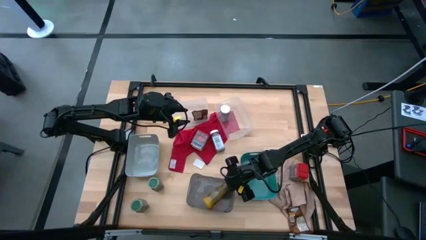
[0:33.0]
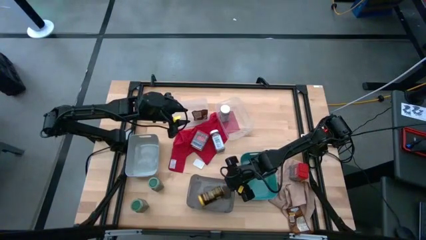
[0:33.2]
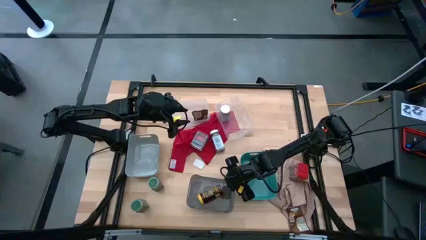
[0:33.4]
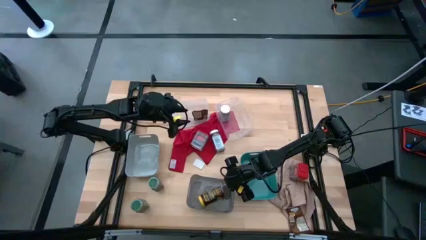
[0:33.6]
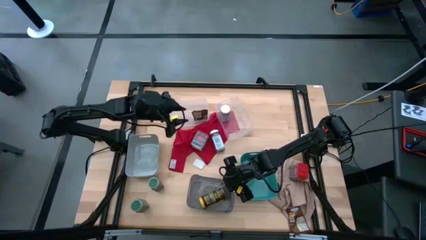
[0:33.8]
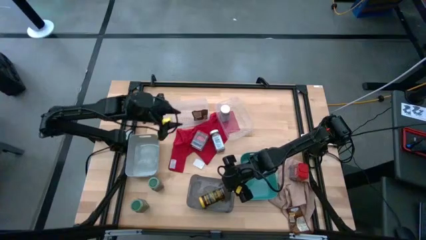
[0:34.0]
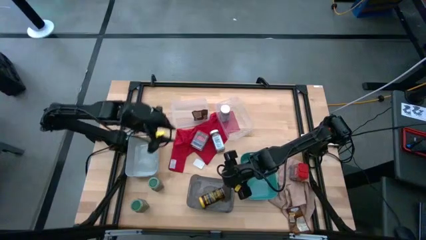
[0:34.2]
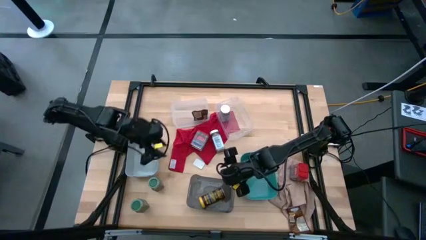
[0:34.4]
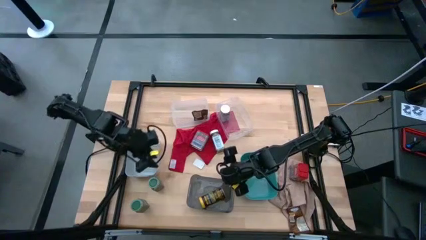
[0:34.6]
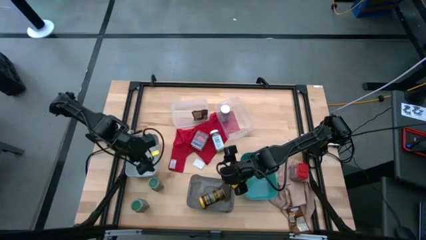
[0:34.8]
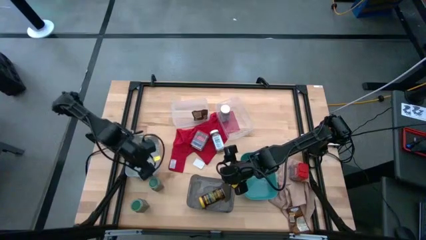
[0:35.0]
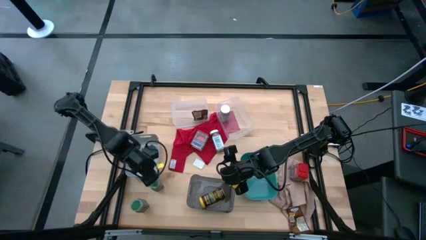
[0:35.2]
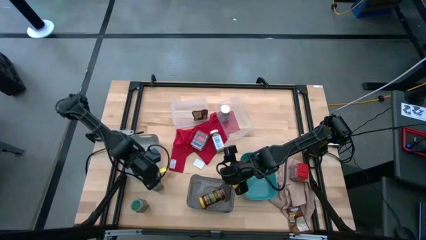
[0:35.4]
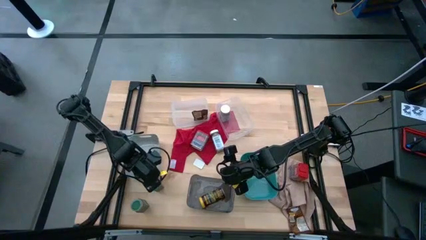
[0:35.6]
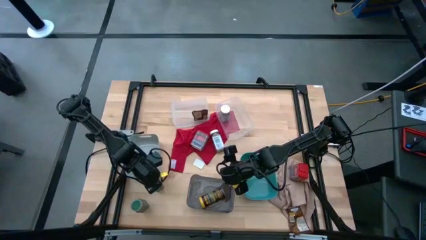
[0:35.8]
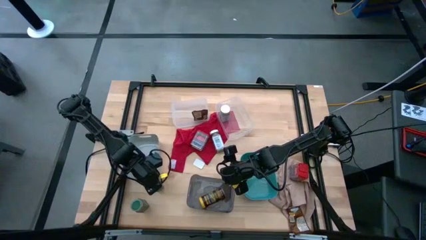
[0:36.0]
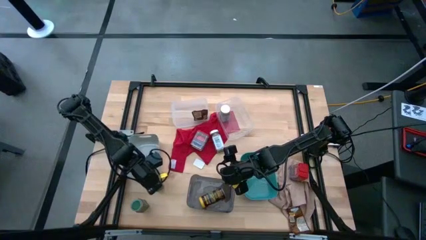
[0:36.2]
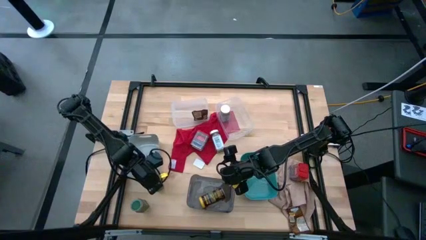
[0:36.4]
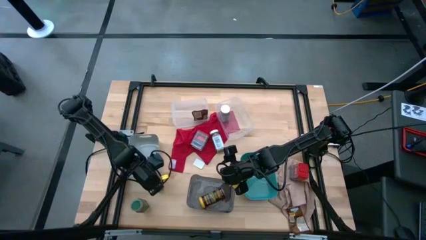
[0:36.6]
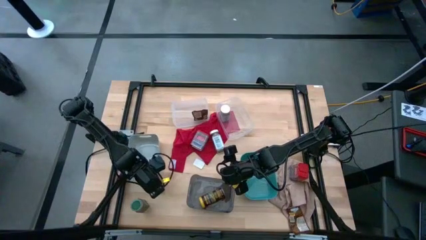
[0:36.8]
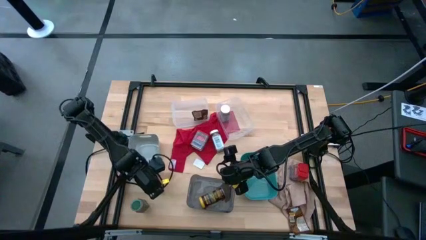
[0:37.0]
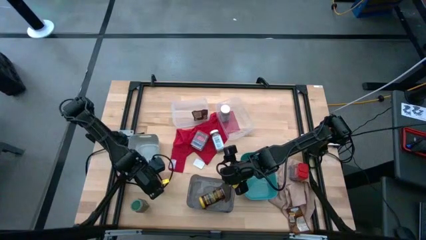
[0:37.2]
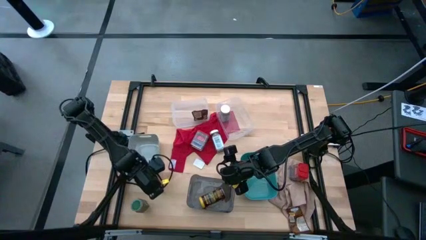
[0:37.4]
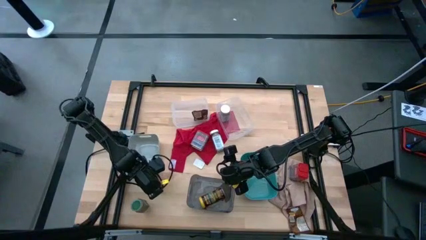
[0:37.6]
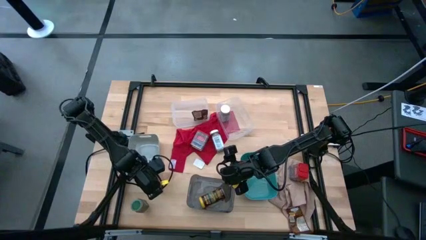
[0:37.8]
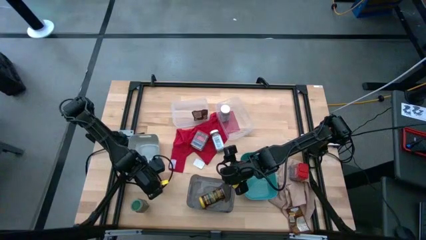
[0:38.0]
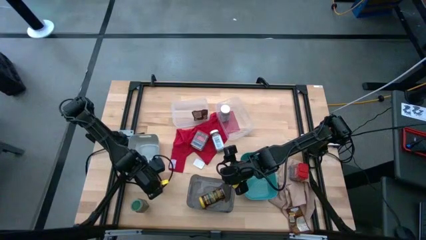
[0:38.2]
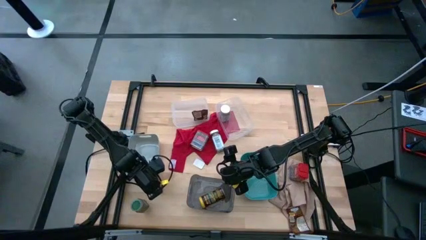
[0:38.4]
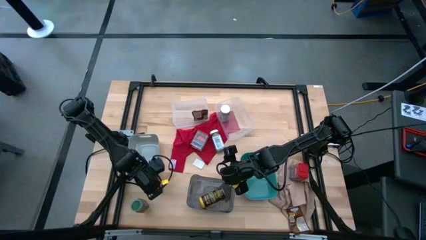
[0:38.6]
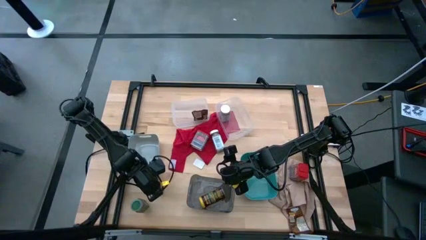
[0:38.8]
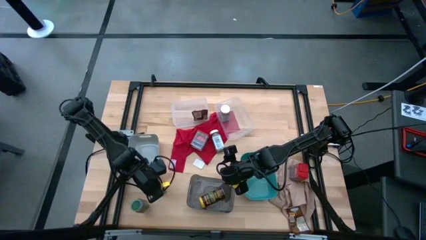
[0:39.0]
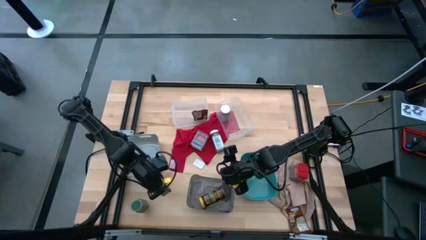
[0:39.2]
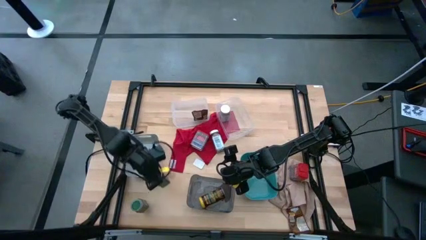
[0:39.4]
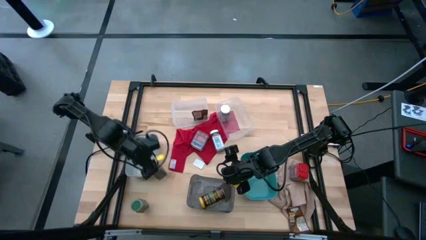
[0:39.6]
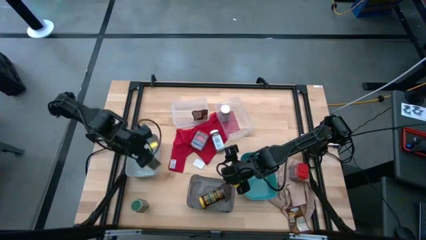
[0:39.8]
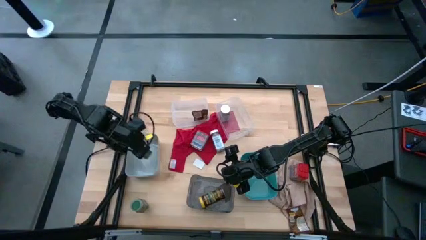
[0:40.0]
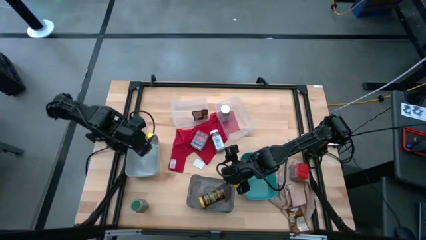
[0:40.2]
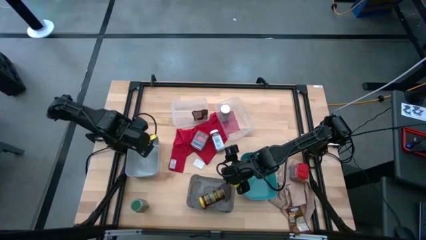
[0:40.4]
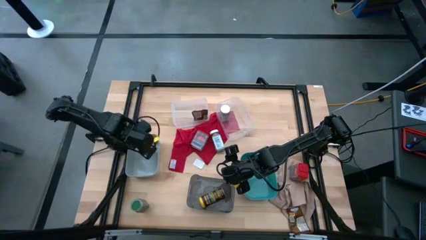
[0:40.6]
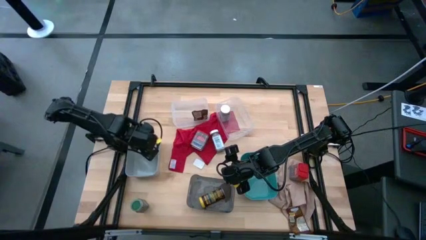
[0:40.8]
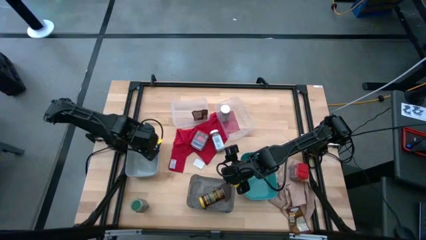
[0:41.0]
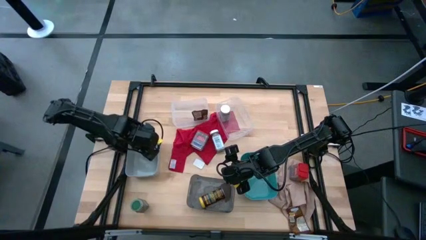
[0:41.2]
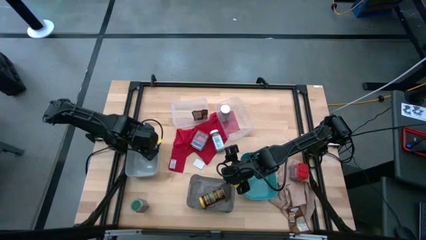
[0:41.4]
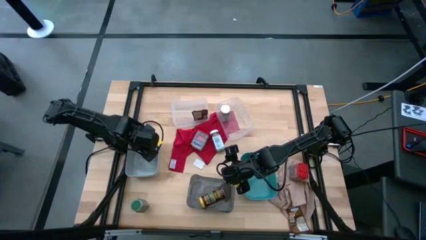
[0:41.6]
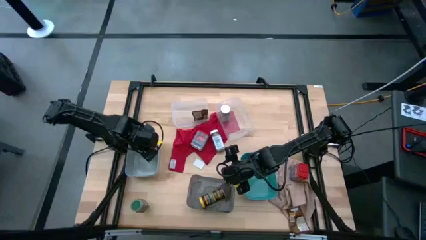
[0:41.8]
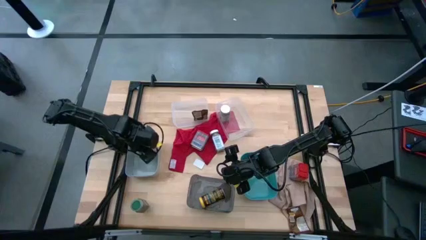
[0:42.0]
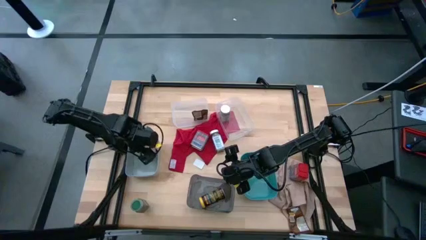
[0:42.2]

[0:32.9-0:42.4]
Task: Sort spices by type
Put the top green seasoning bottle into the gray bin

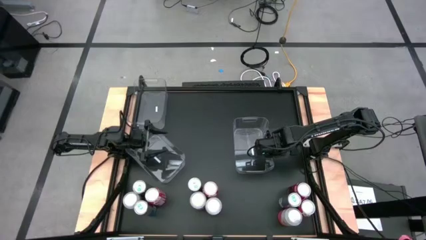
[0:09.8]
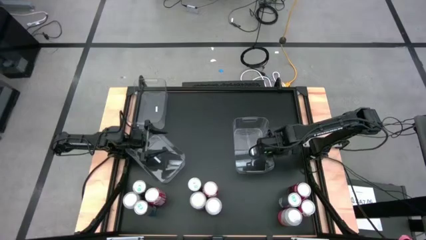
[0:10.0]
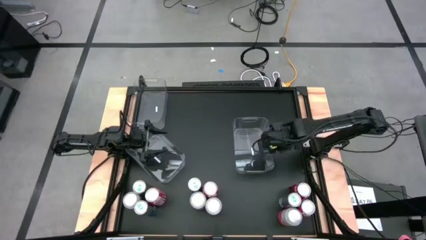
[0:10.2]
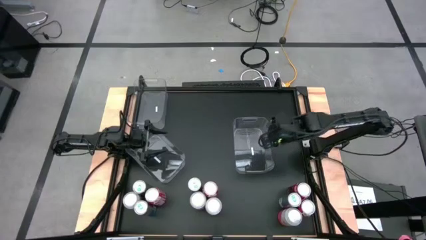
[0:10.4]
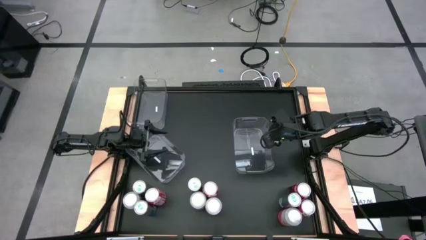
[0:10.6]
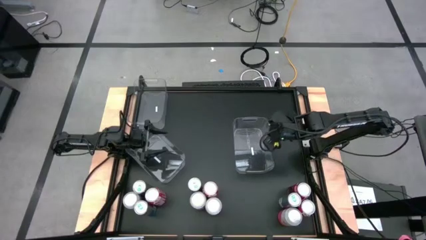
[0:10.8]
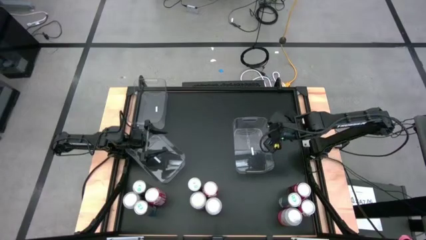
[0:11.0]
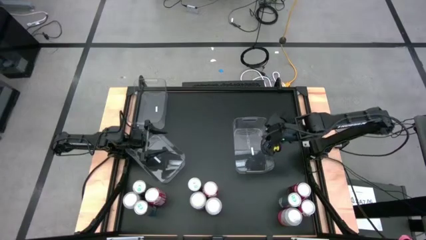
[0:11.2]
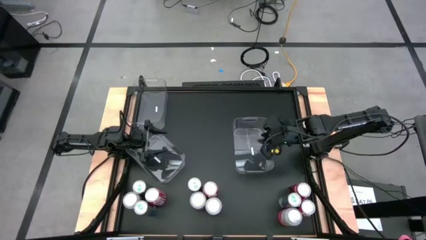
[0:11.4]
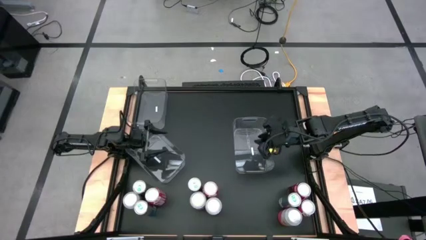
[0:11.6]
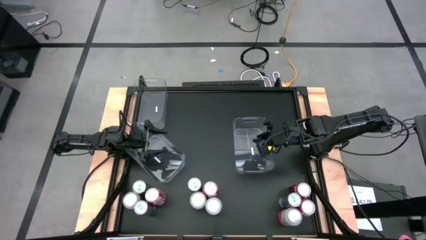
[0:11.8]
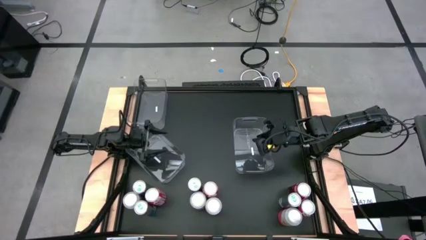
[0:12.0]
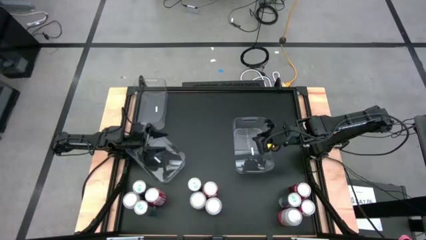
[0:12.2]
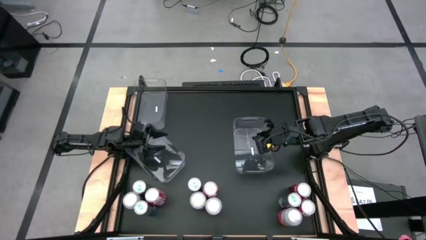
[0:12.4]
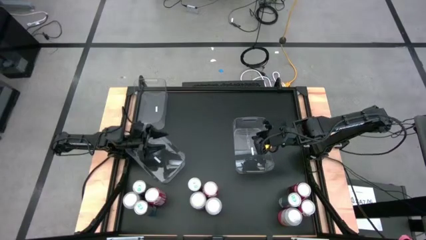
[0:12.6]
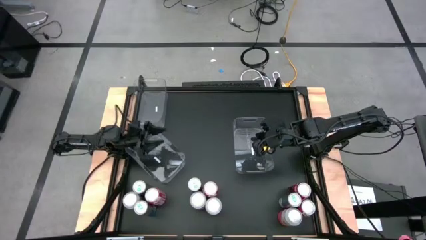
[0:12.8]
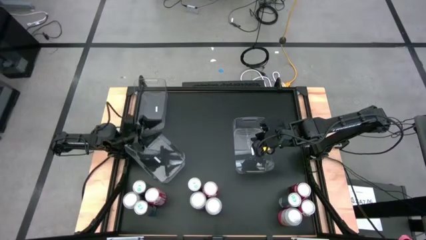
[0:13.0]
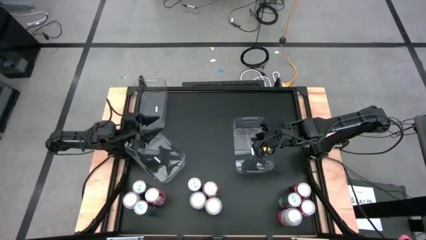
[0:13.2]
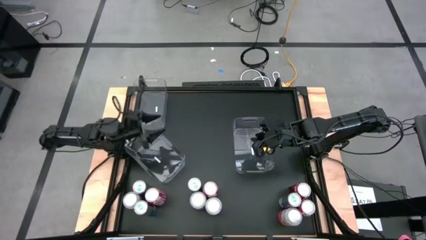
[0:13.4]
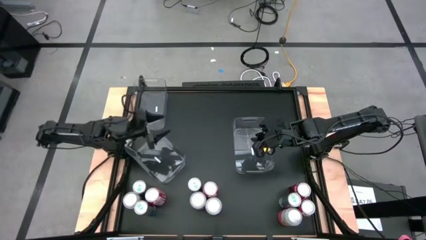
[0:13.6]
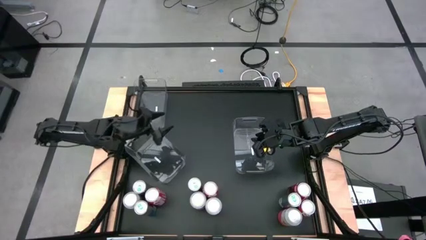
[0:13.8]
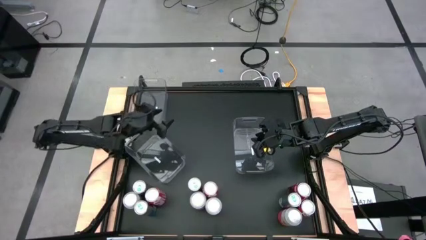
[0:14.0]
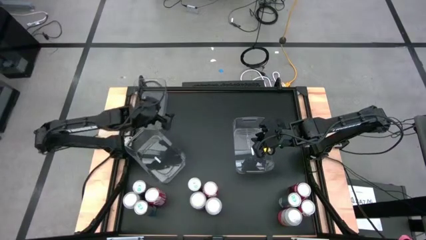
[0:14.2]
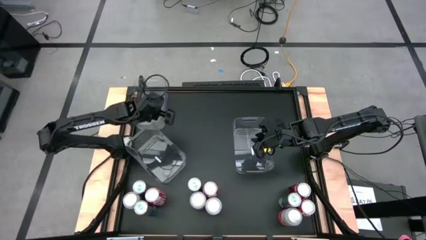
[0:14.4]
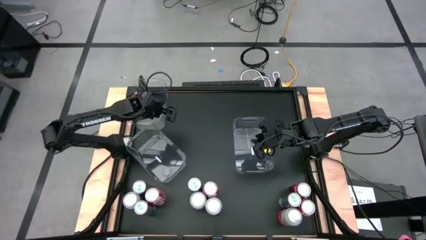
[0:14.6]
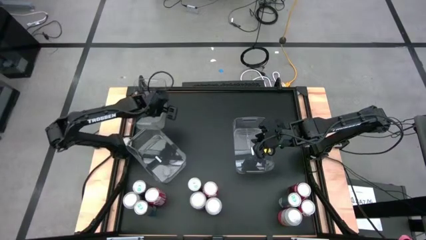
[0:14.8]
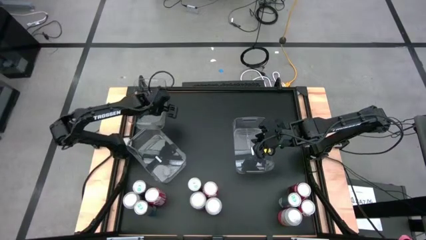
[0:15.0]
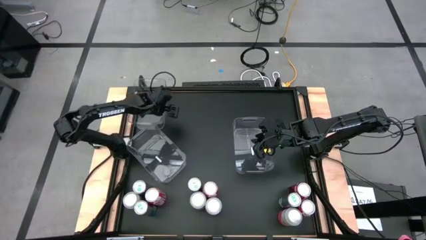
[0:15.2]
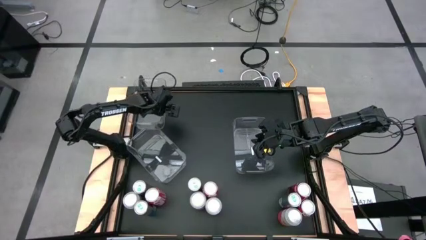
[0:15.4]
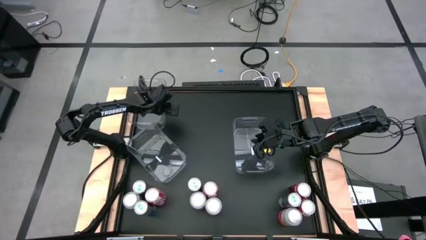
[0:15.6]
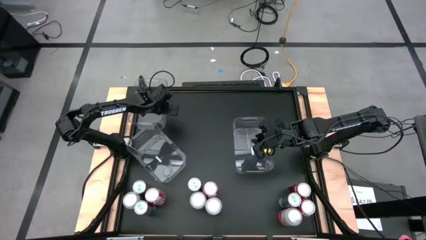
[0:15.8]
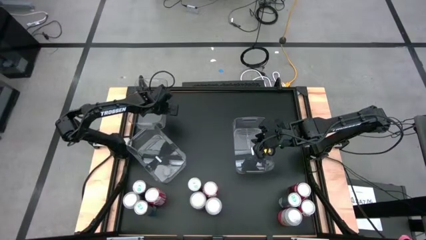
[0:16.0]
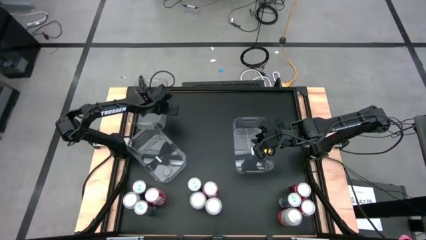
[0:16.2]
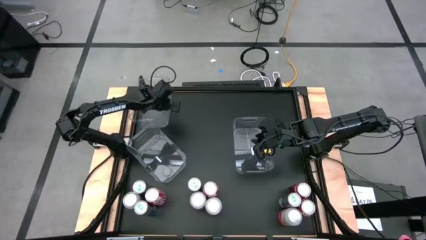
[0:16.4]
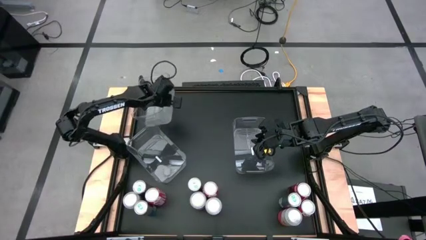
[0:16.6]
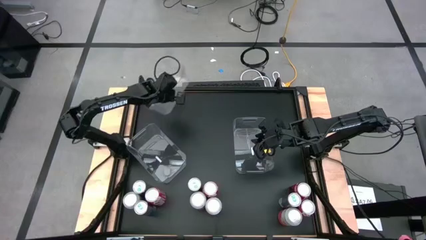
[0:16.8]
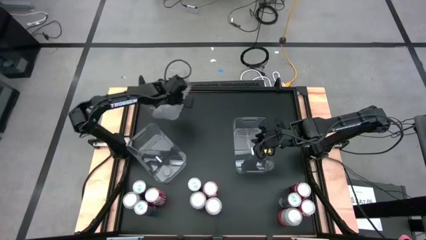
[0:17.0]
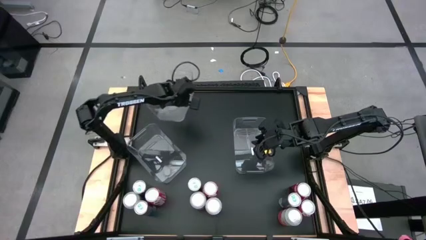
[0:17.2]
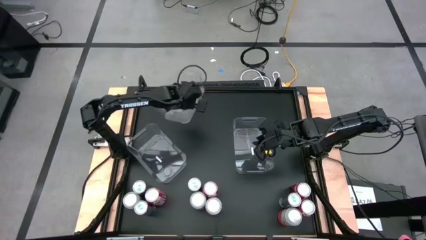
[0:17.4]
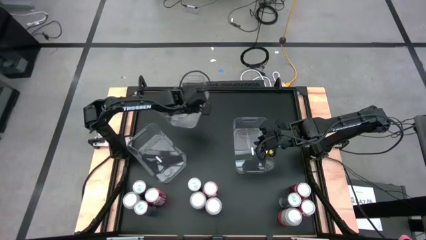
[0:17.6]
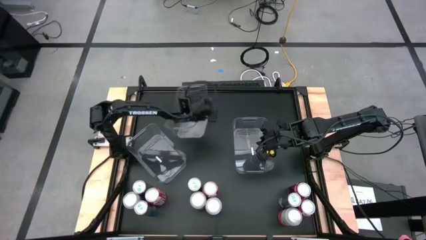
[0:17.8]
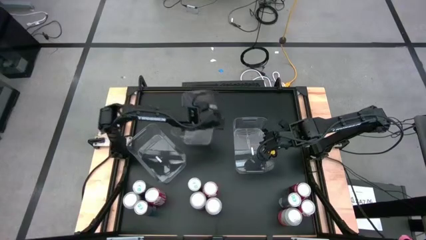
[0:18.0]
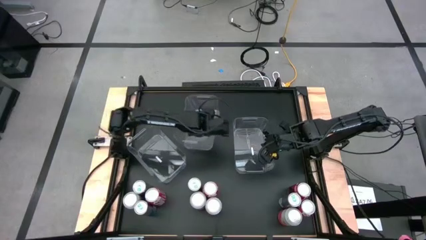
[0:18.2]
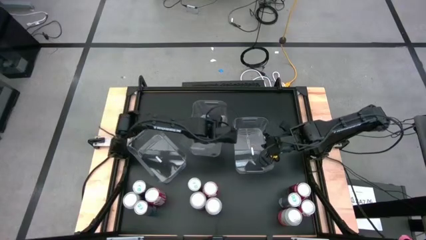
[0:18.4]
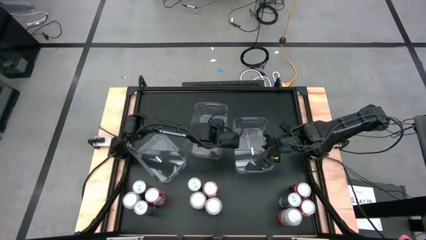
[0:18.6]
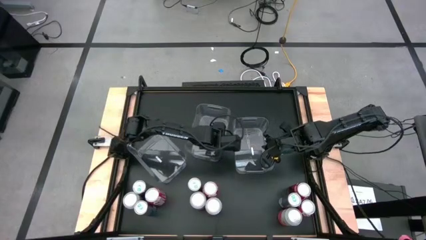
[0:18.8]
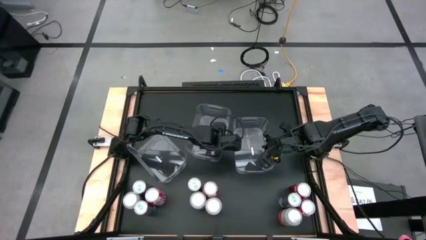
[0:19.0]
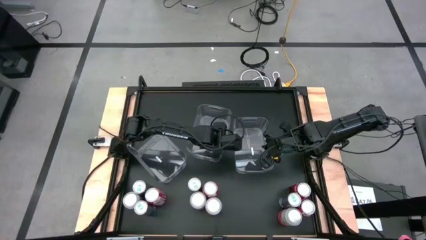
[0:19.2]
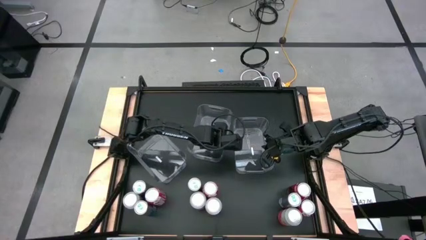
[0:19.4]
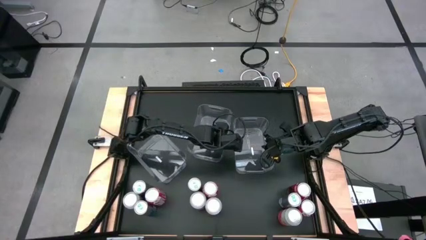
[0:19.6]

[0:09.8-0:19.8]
Task: Sort soda cans
Move the top left transparent bin to the center
